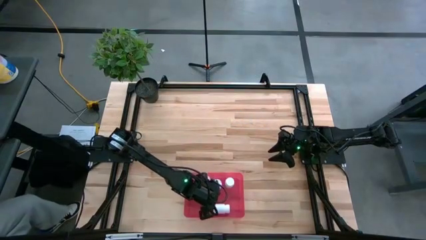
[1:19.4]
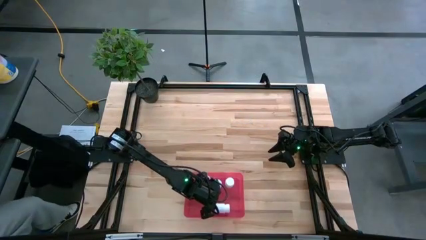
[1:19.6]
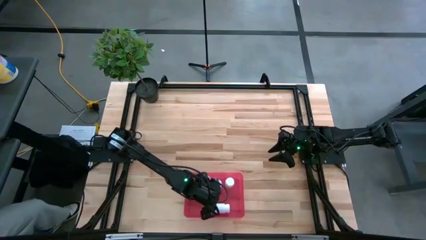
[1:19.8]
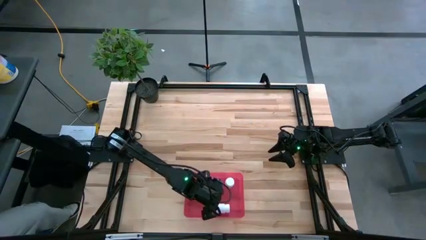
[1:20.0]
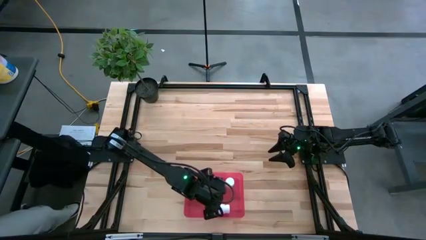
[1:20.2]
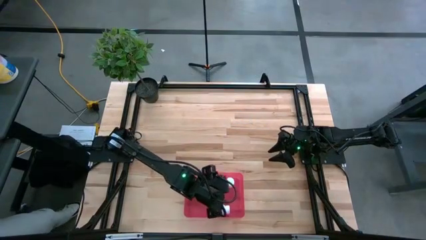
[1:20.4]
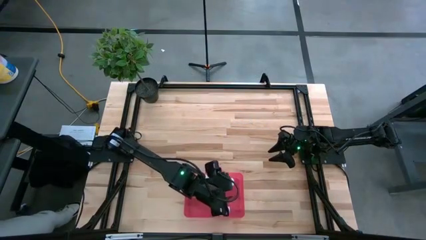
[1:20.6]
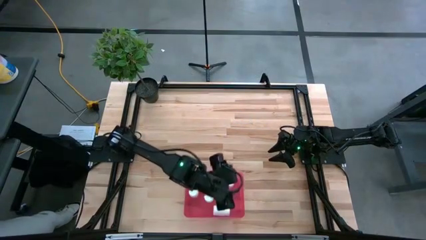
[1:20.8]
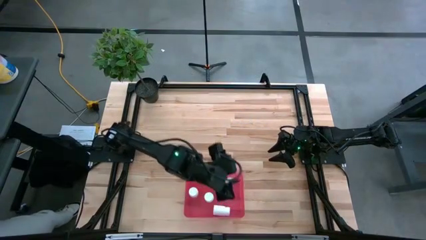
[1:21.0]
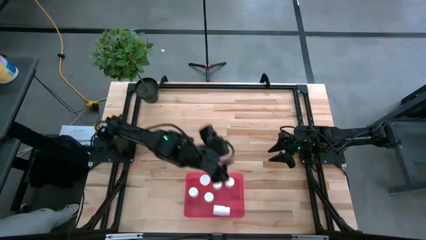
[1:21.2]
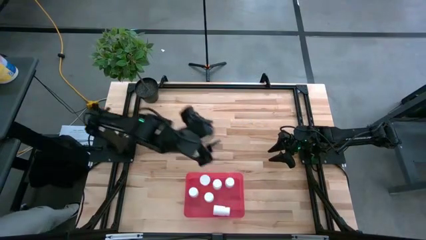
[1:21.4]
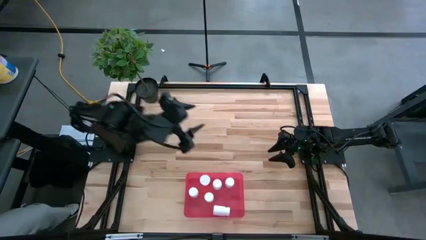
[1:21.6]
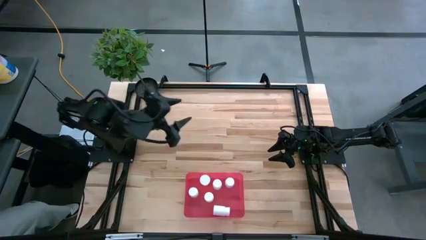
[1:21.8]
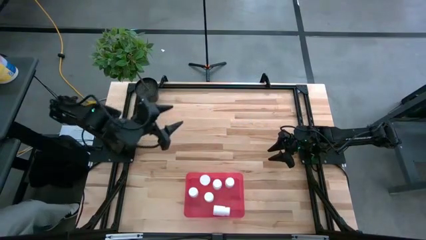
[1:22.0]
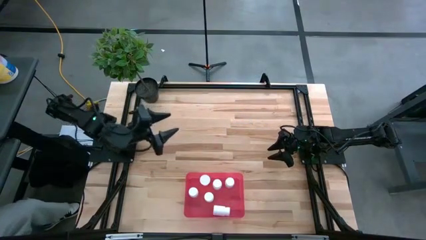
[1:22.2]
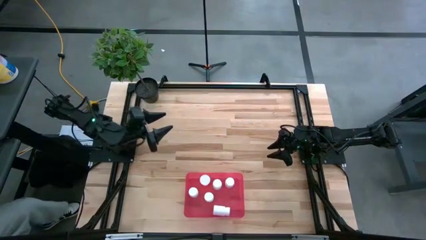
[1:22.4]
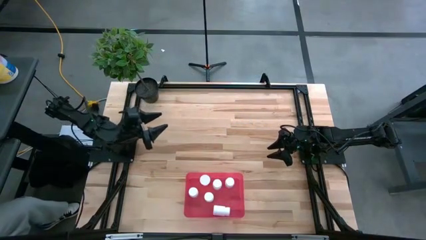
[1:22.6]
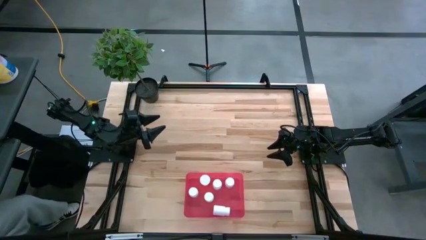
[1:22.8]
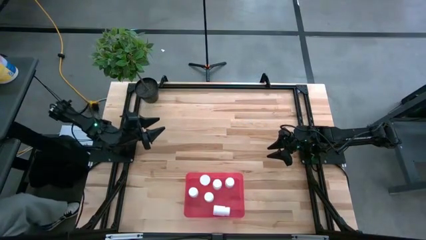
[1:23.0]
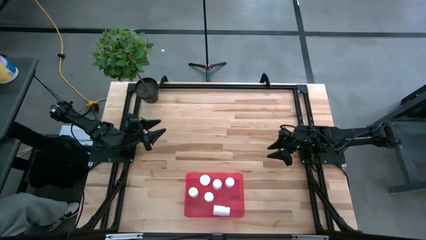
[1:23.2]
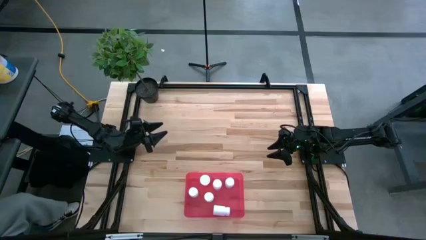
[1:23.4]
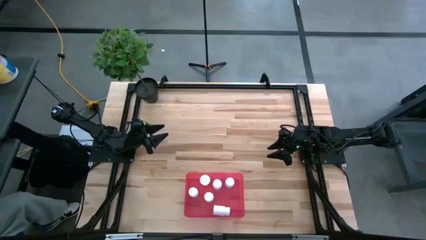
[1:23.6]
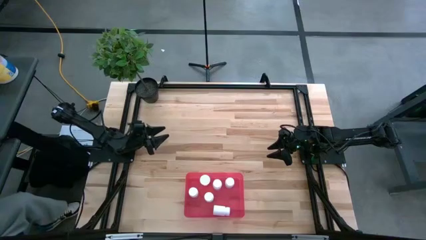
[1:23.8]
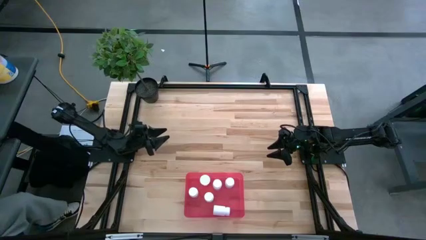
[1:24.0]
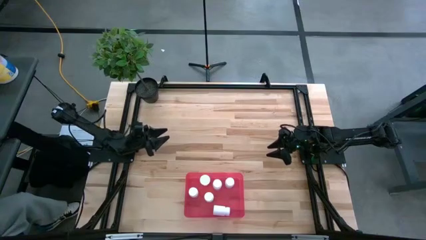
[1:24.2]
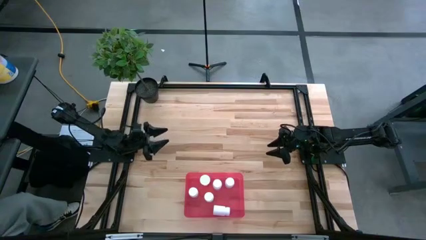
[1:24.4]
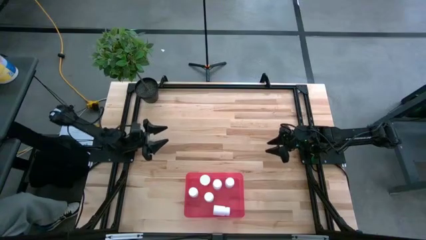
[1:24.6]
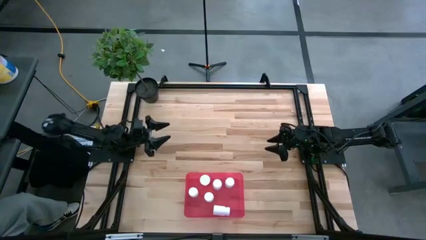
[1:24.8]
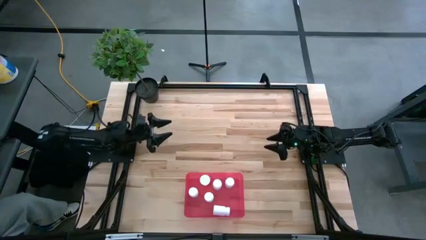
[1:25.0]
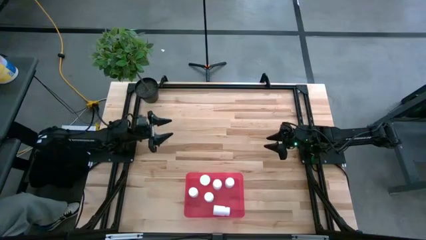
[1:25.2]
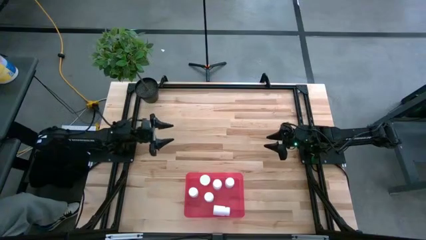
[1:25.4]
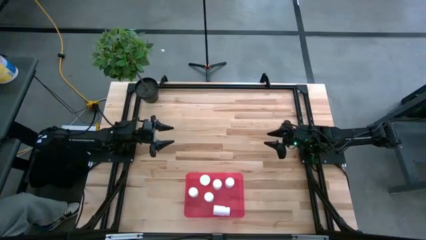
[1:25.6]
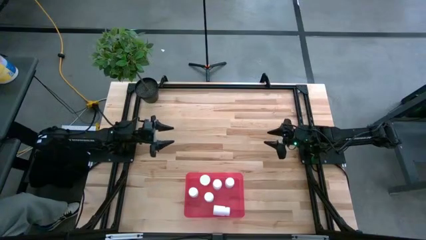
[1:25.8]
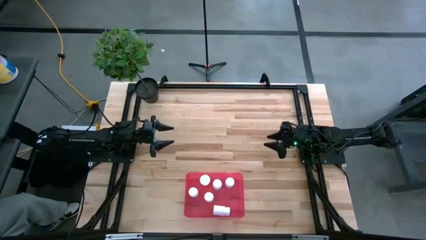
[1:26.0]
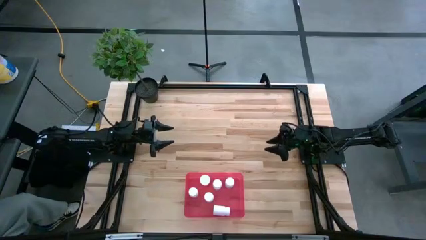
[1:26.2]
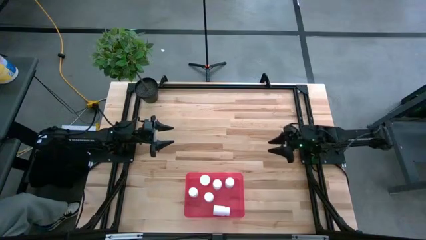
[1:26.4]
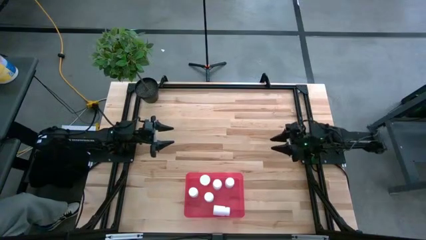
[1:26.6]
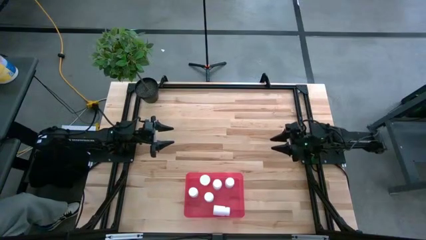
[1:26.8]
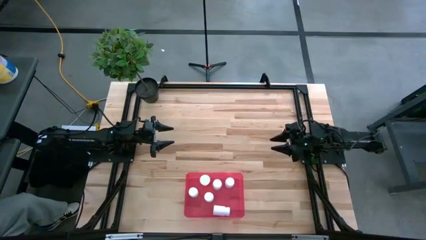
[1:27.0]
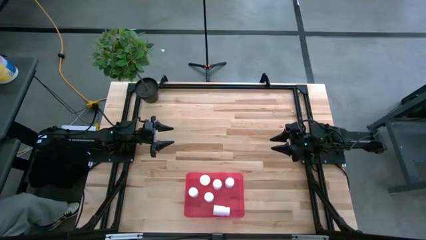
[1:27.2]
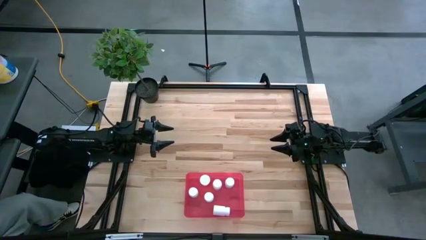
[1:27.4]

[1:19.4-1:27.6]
Task: Pick and place pill bottles into a basket
Return to Home Position

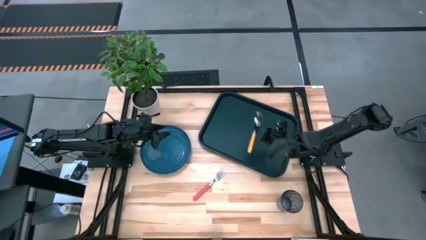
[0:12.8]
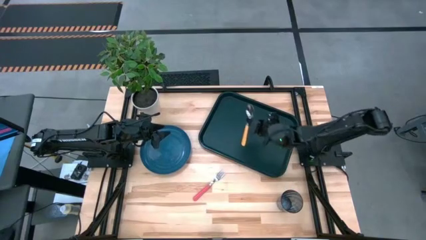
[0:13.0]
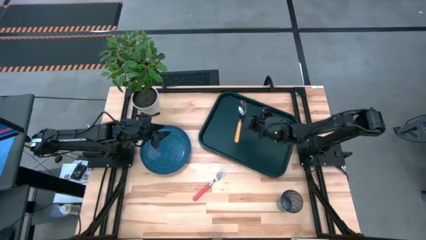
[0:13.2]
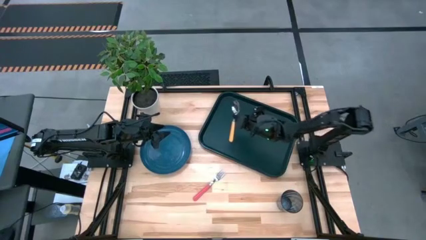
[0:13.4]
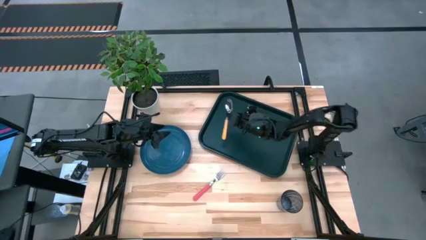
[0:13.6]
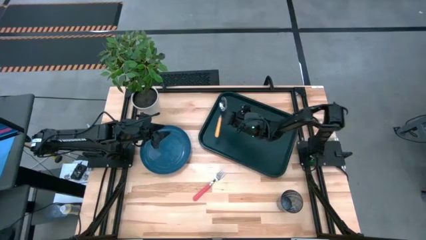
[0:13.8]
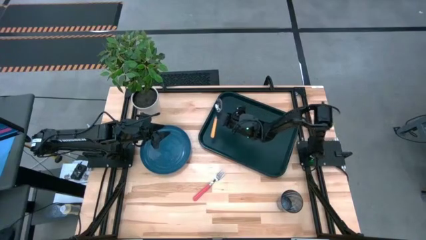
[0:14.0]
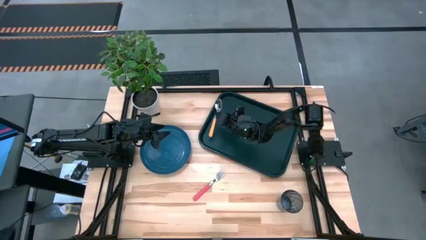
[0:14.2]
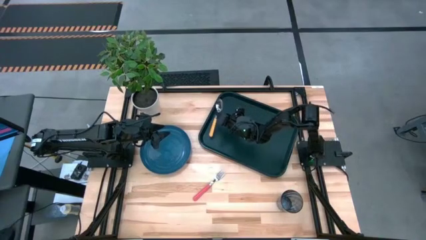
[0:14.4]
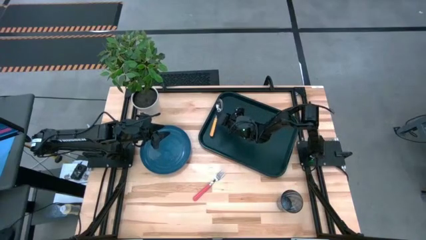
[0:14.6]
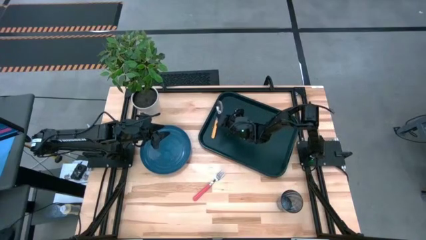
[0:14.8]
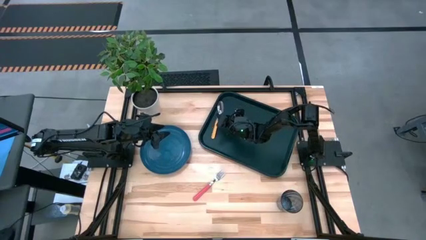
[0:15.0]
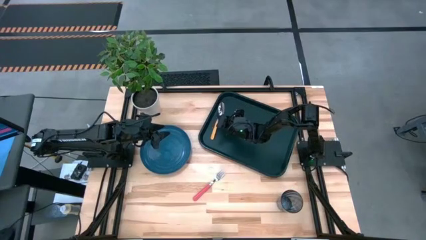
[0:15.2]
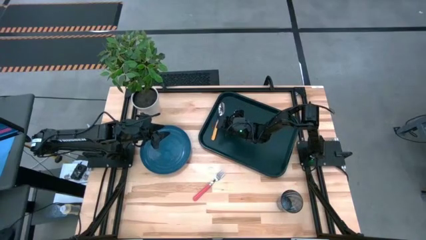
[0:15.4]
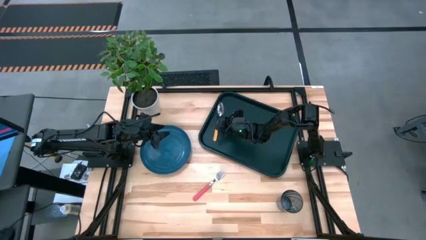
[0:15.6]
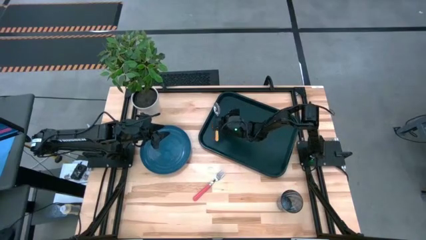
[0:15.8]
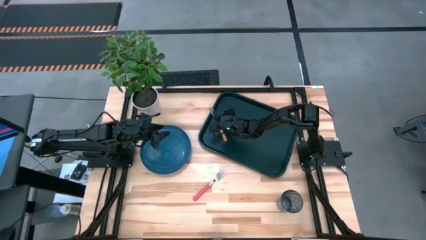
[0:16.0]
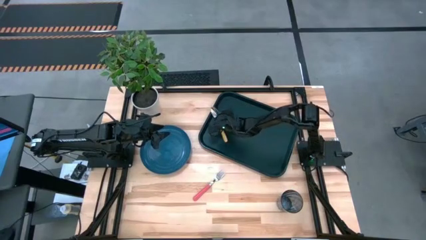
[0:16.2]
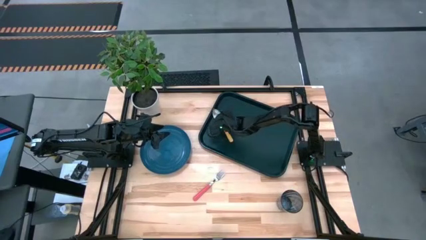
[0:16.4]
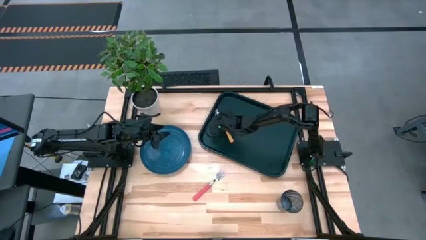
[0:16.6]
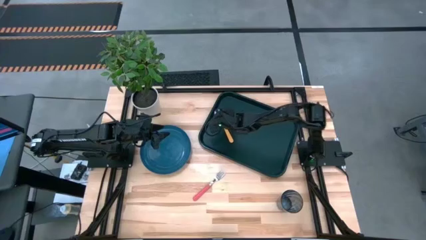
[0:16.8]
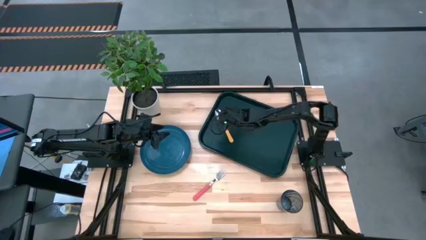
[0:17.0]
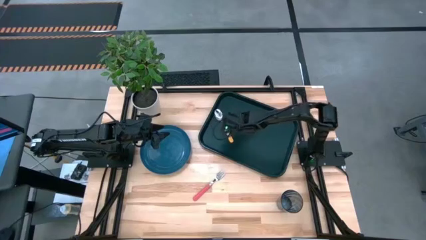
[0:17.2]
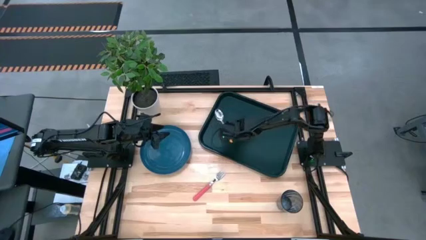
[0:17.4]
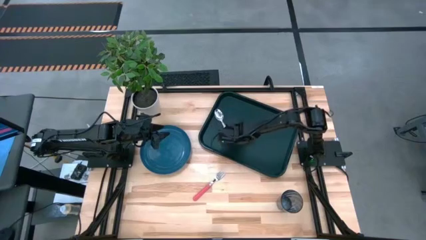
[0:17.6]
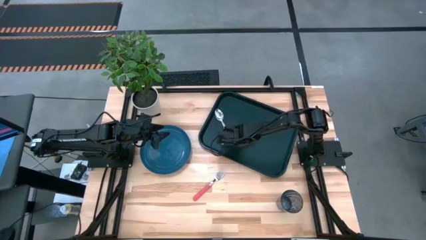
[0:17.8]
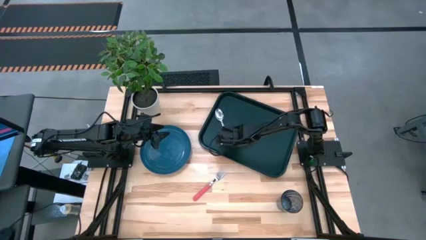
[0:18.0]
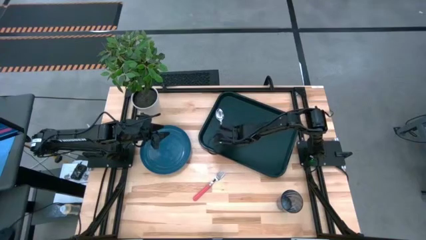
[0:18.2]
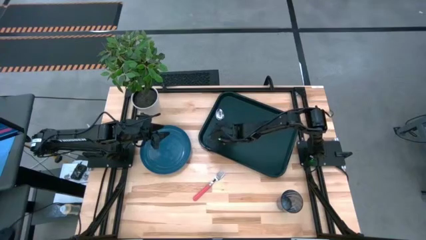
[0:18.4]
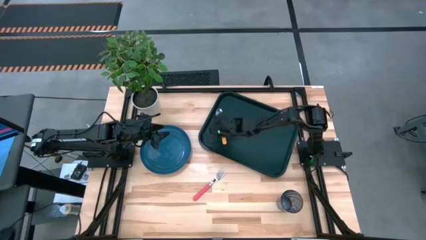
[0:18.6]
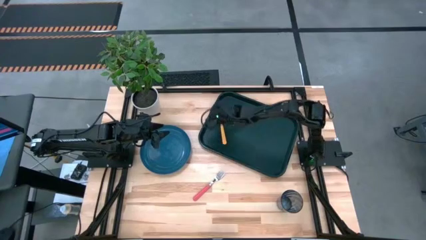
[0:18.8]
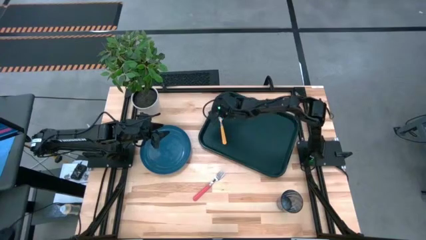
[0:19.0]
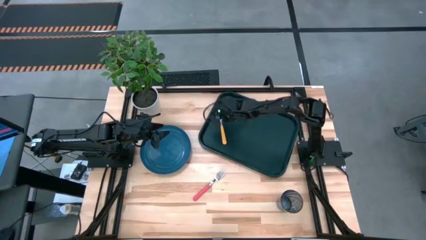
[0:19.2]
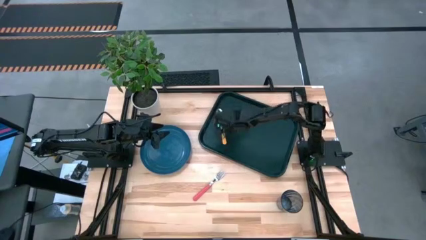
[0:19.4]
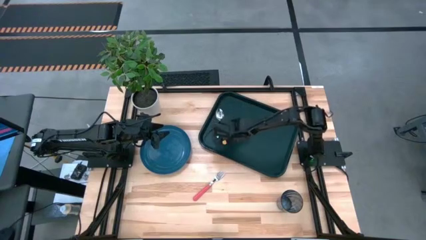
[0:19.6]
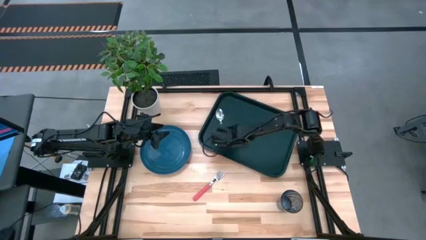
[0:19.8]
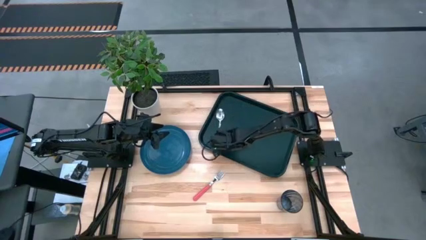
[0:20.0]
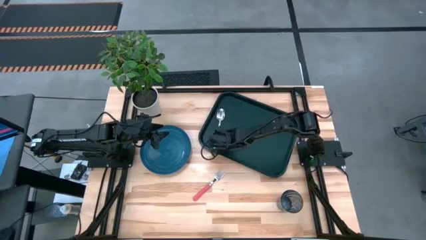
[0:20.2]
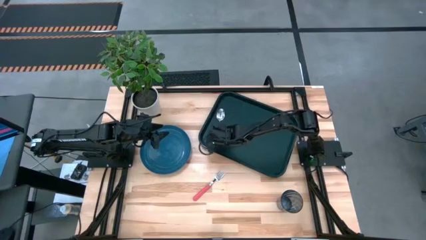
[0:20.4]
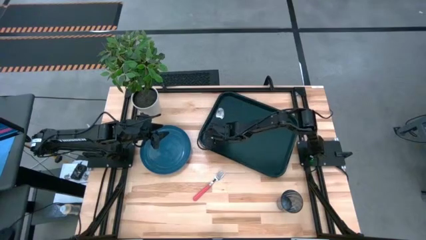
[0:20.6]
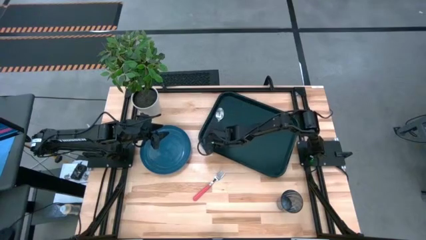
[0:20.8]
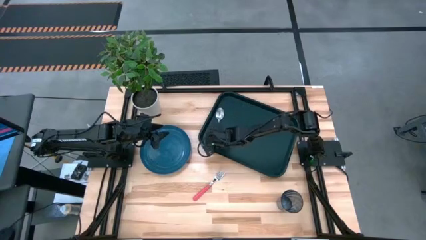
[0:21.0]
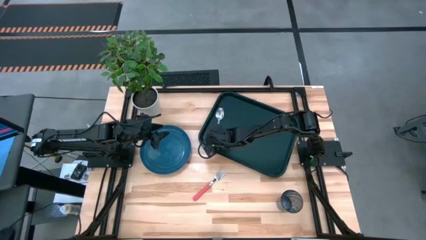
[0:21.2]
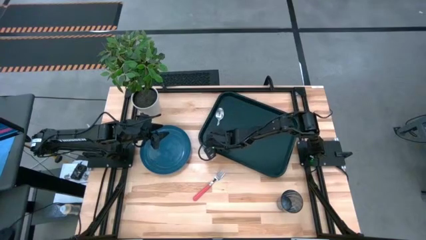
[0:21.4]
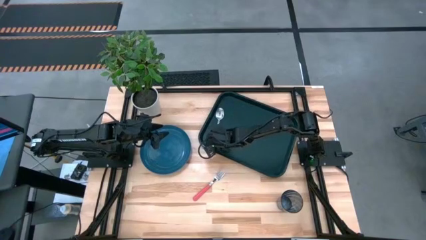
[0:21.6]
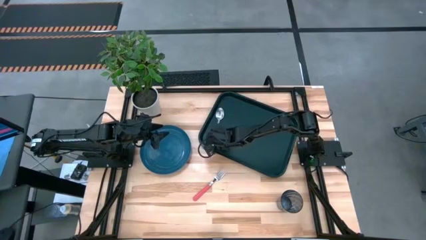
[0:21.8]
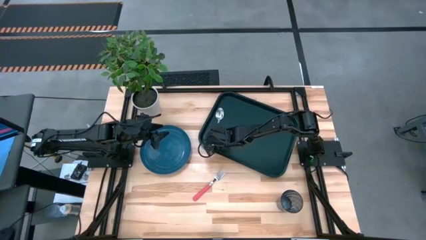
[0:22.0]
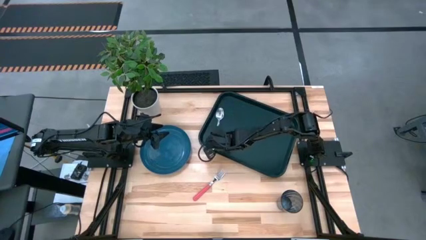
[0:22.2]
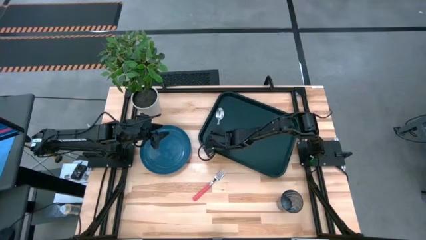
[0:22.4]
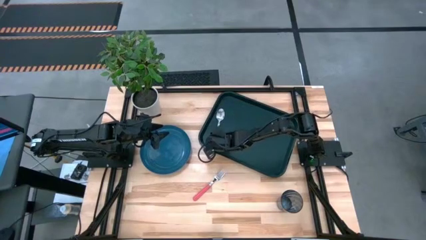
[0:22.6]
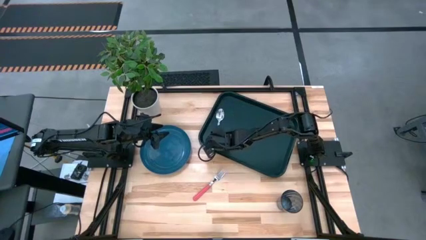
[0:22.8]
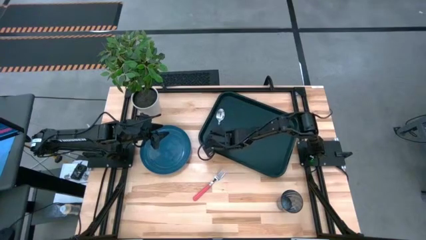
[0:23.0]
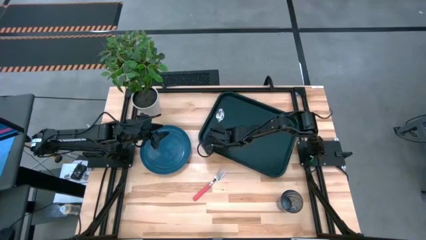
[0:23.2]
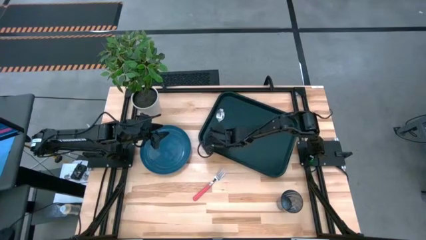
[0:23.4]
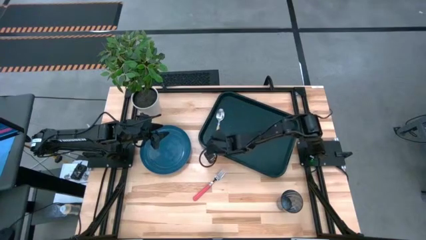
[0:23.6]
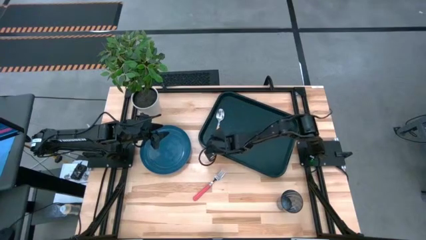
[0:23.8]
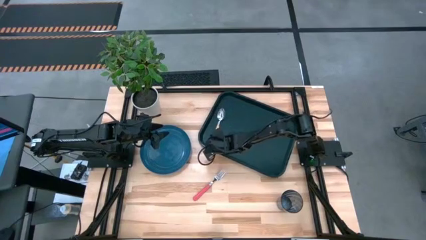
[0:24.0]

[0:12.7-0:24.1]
Task: Pick and place plate/cup/fork/spoon on tray
Put the orange spoon on the black tray
